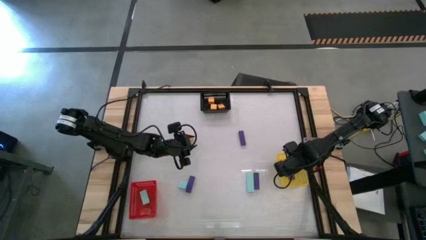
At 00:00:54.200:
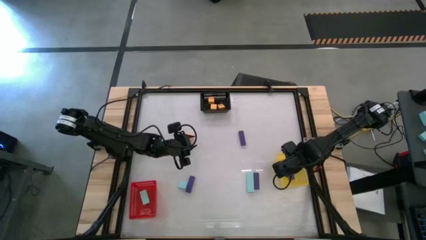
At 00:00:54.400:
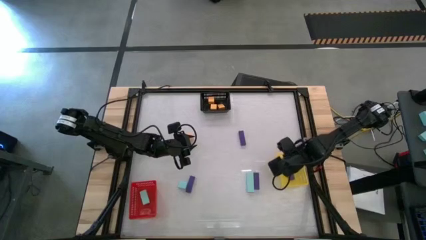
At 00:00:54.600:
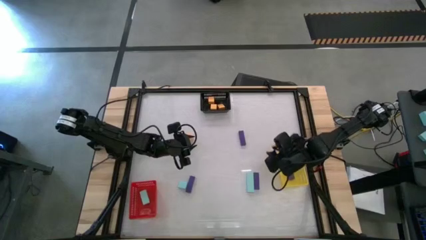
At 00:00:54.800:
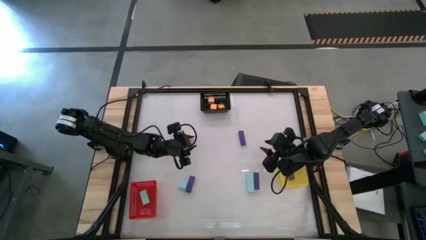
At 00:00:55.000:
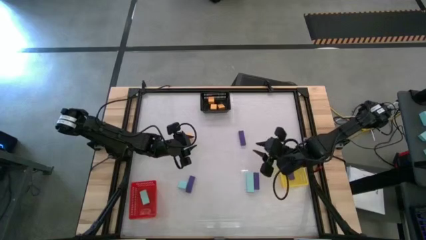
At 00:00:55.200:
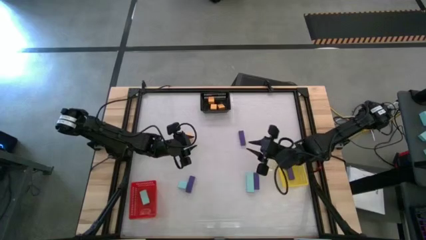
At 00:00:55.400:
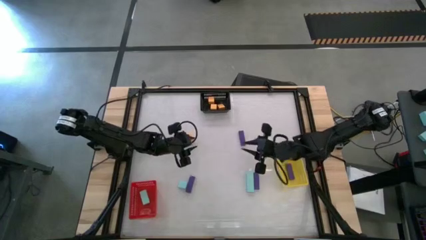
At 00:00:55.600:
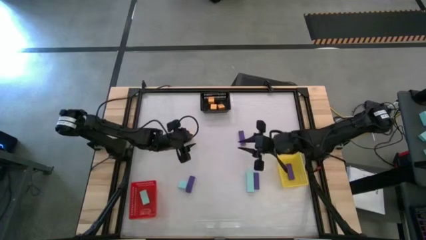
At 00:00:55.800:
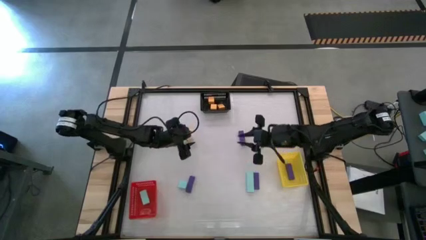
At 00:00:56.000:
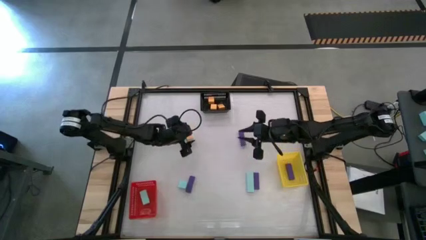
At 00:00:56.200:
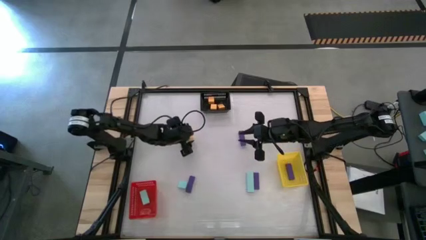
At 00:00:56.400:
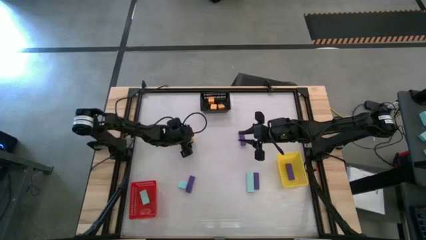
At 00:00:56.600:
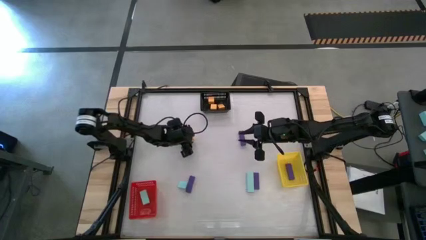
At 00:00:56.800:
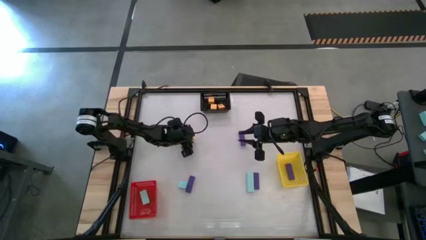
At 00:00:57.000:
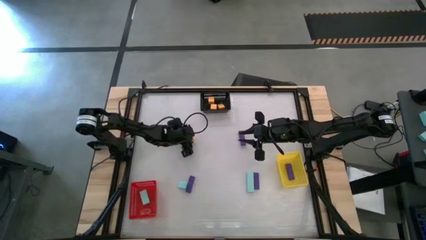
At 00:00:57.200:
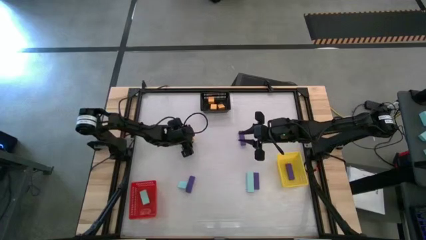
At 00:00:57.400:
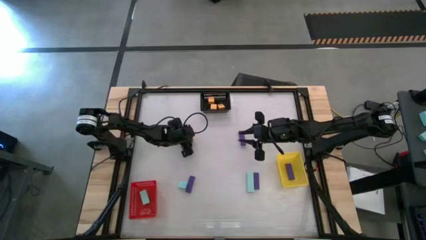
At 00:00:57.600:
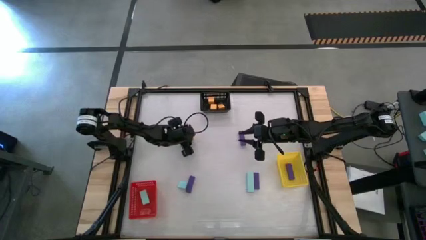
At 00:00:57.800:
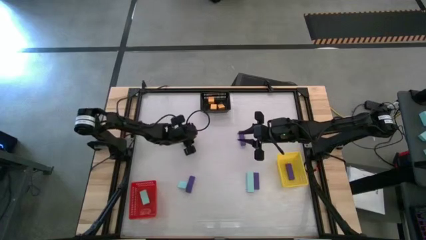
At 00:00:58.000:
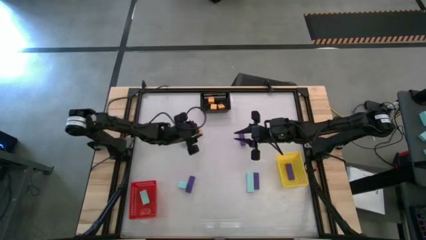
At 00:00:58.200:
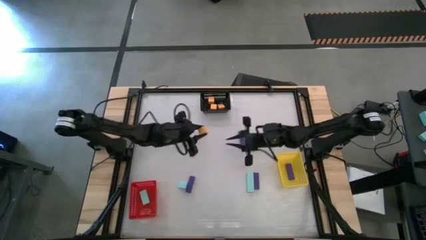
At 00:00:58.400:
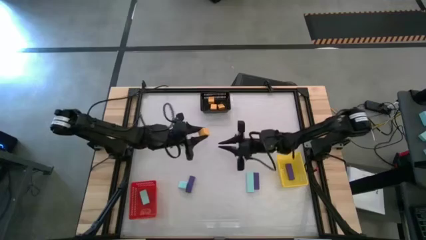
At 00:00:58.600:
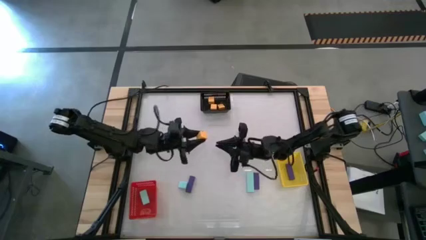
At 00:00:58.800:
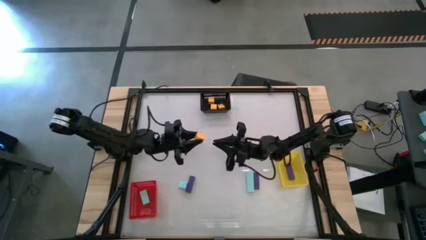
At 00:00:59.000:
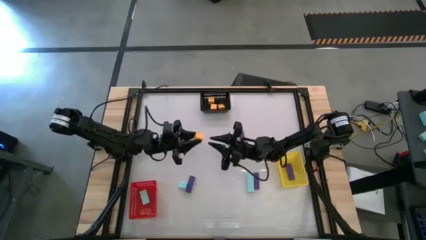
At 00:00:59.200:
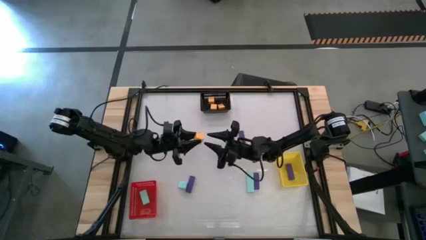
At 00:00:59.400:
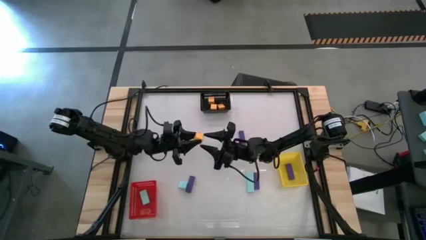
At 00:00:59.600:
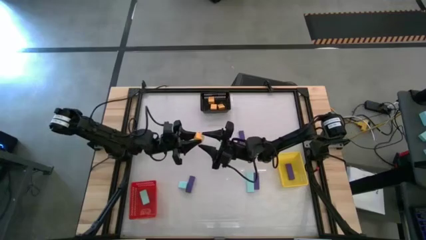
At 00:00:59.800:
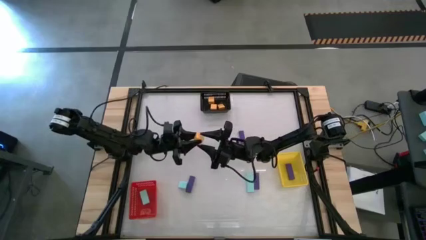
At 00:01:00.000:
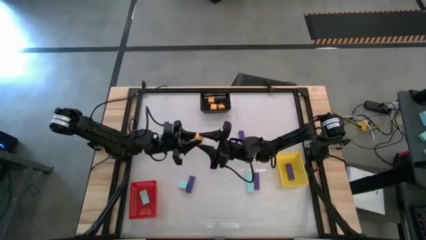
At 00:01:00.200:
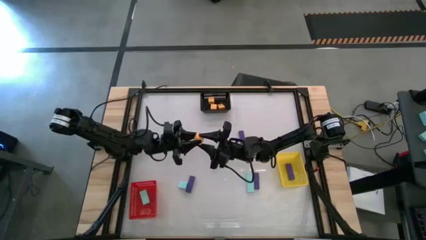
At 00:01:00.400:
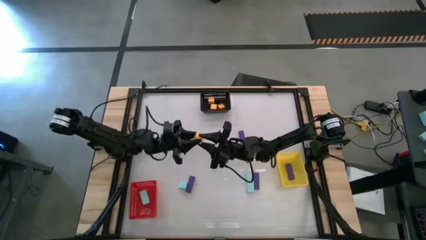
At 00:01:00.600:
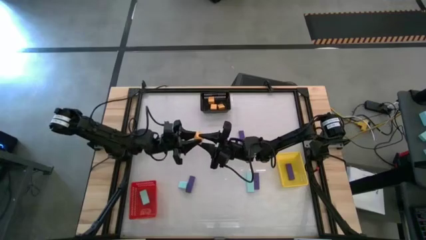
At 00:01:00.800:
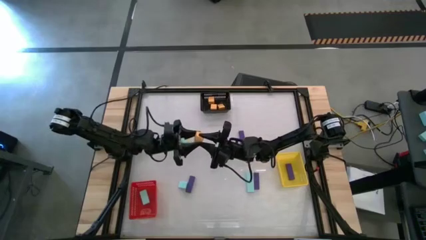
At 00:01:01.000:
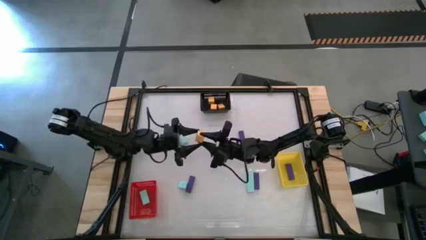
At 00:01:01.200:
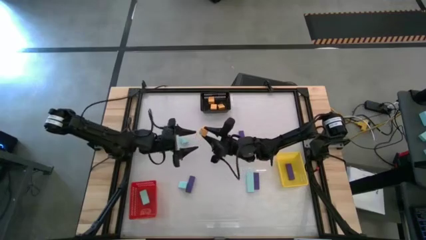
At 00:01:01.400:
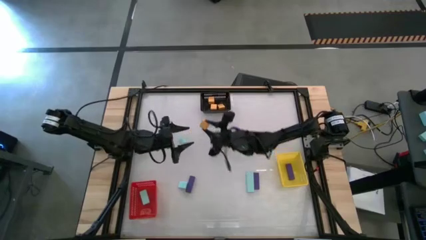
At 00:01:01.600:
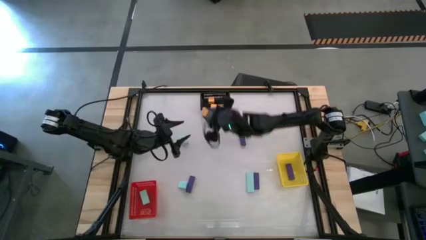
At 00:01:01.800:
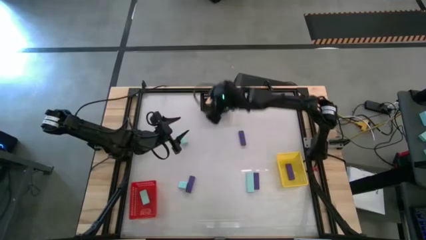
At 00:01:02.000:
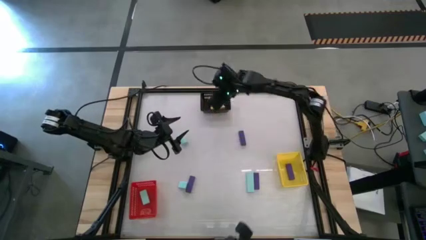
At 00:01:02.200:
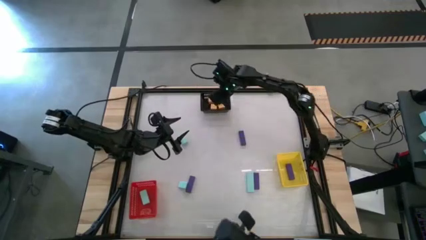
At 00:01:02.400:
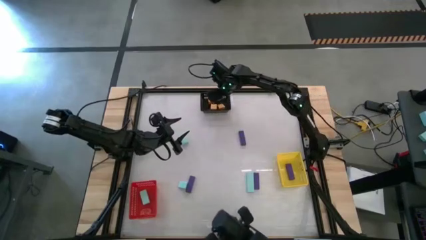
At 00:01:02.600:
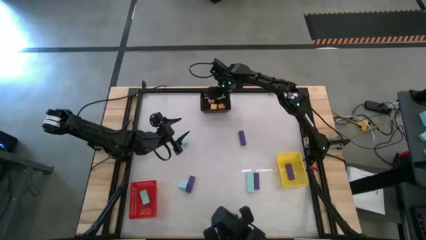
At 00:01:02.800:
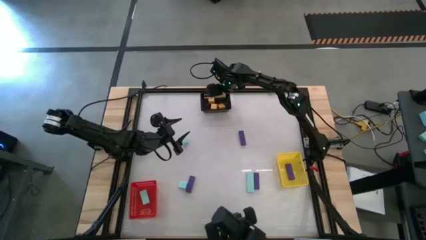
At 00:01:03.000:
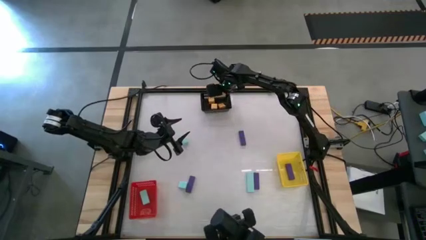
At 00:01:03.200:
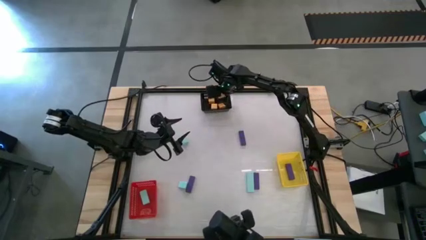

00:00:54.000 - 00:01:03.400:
Task: Sort & place blocks by color
Put the yellow block into the black bin

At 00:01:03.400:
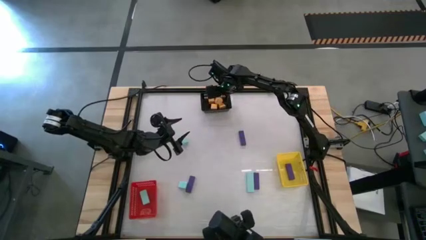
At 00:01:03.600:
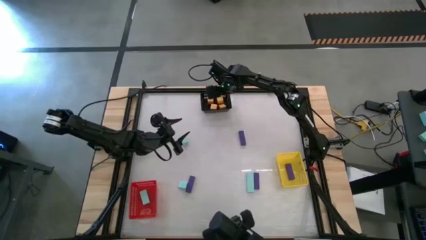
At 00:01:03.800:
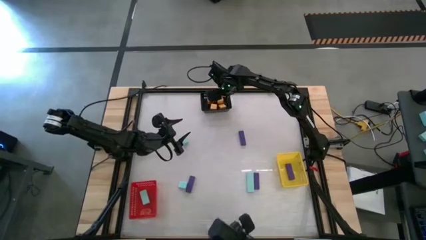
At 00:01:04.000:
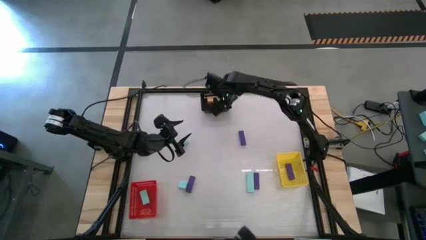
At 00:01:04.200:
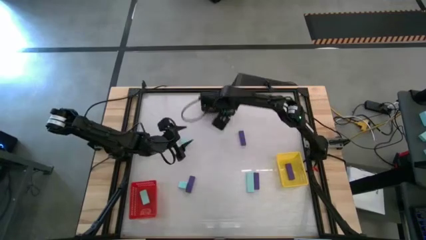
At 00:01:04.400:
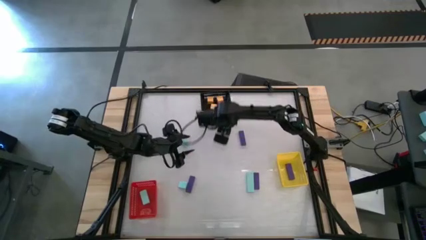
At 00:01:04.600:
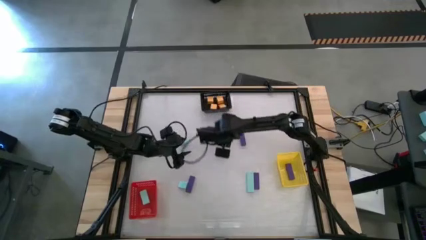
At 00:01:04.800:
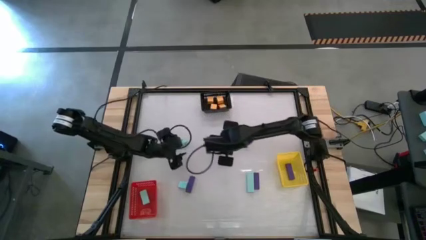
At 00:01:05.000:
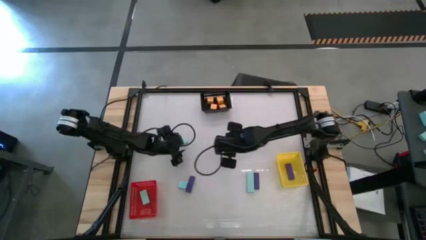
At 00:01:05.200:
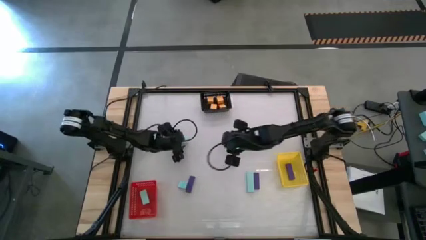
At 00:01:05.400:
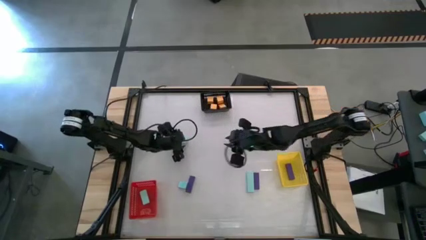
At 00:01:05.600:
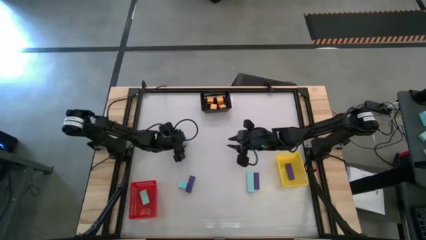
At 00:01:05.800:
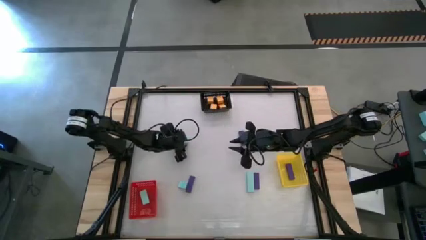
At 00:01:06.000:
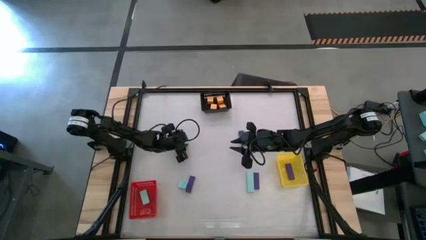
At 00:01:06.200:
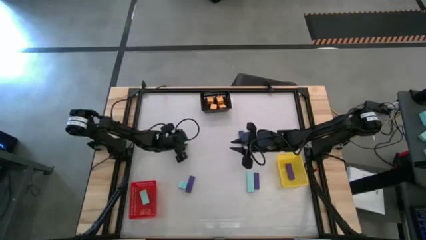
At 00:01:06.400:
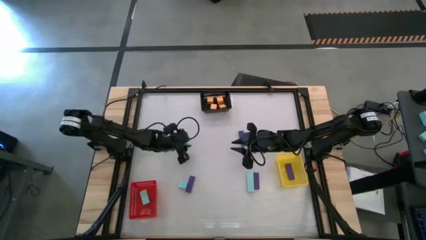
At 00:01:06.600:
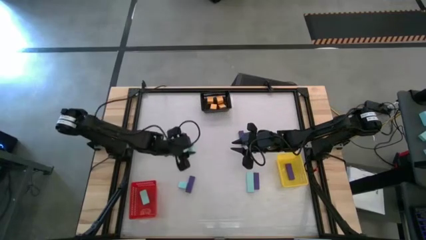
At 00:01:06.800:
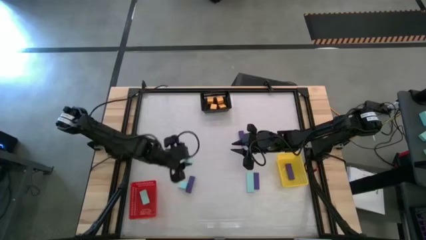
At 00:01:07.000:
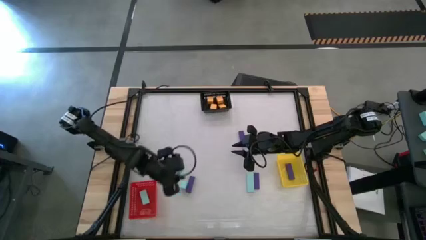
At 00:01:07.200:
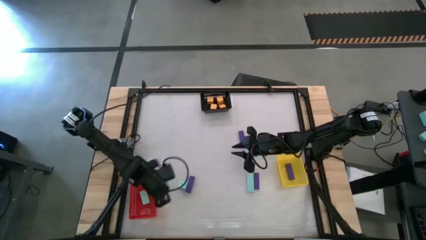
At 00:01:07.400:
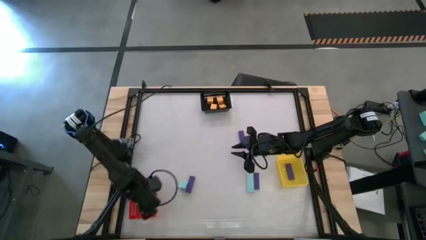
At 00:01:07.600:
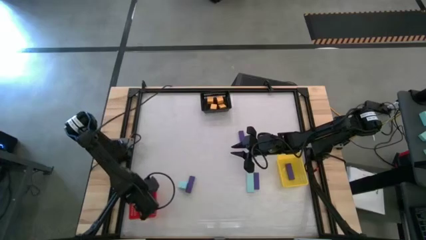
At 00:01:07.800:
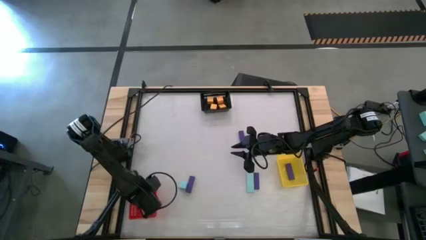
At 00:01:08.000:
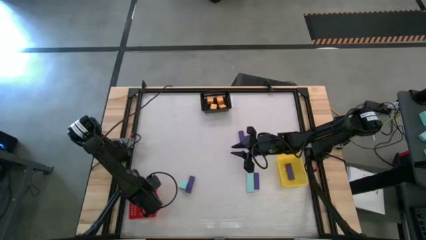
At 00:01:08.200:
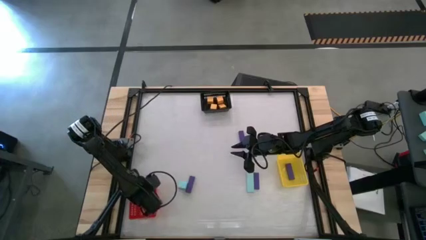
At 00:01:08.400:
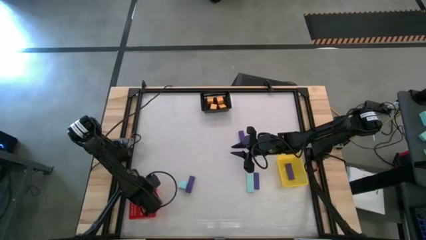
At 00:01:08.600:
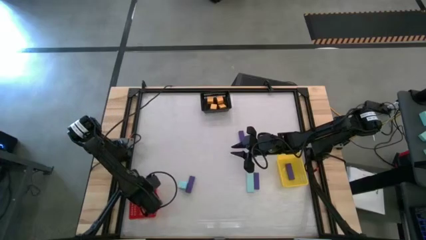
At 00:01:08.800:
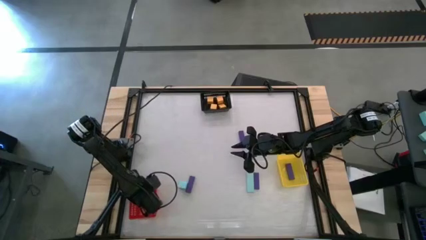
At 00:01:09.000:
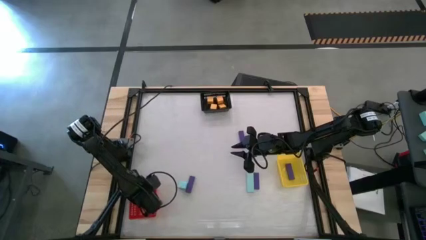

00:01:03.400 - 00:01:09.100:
Put the blue block into the red bin
